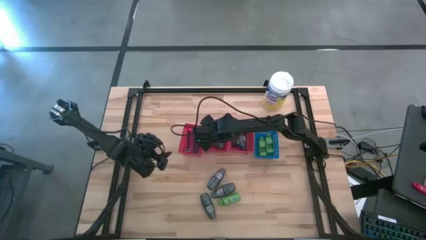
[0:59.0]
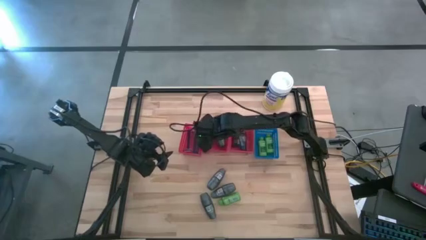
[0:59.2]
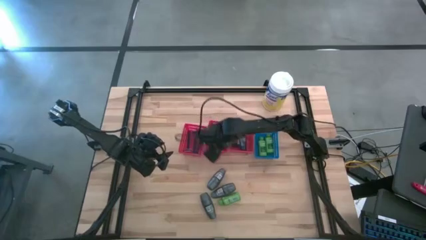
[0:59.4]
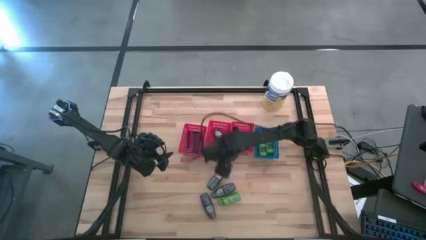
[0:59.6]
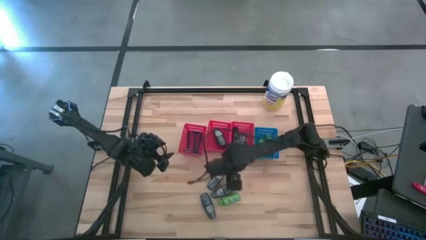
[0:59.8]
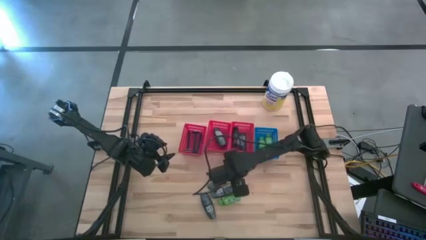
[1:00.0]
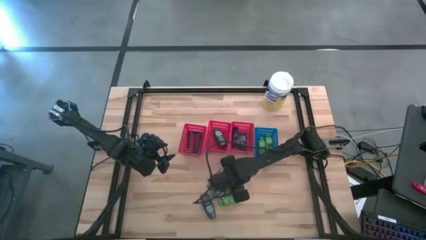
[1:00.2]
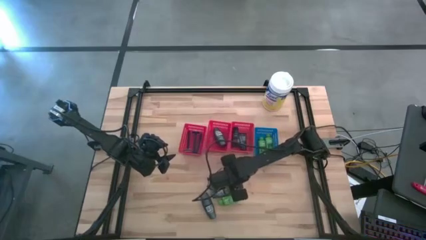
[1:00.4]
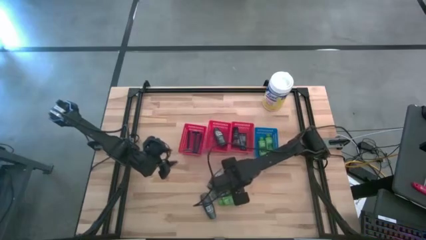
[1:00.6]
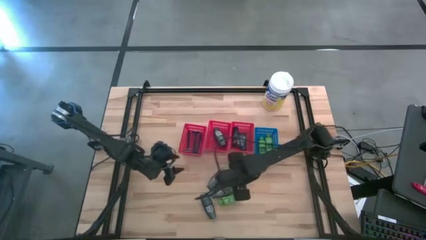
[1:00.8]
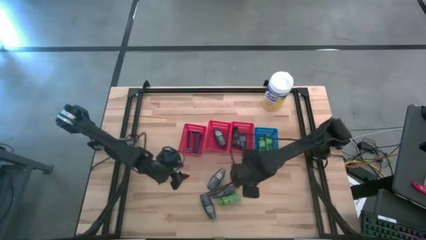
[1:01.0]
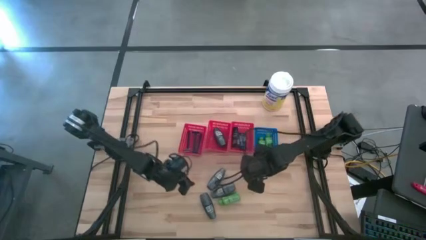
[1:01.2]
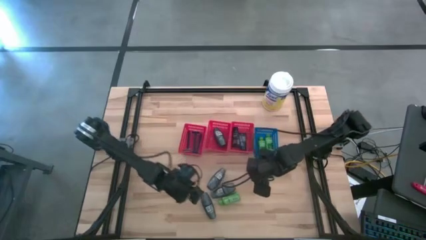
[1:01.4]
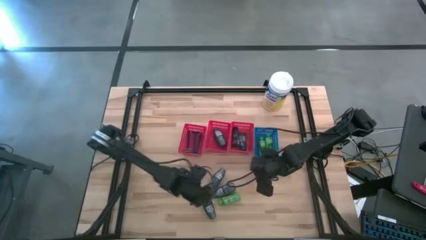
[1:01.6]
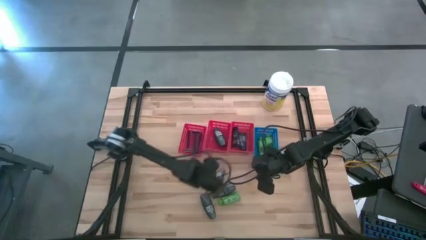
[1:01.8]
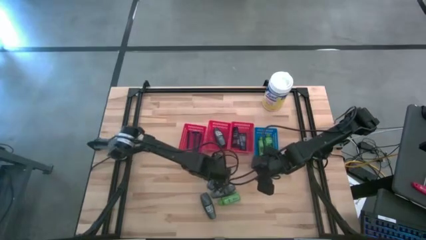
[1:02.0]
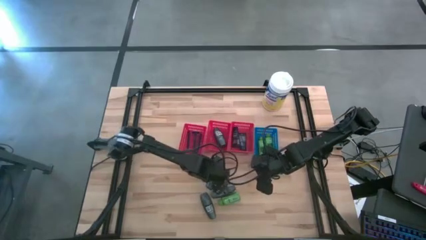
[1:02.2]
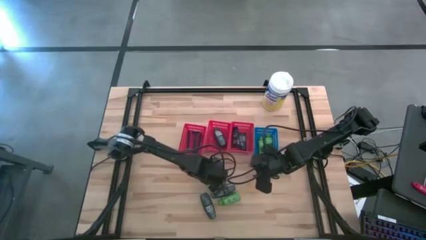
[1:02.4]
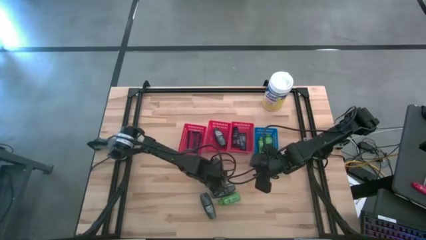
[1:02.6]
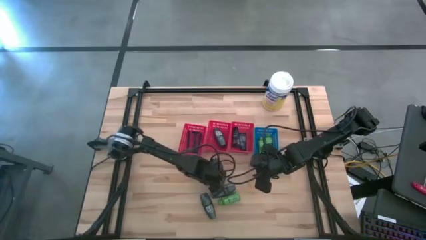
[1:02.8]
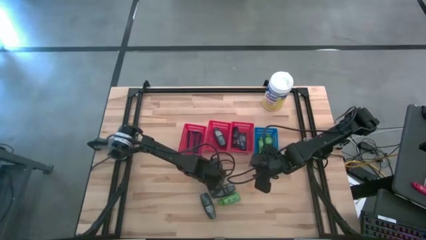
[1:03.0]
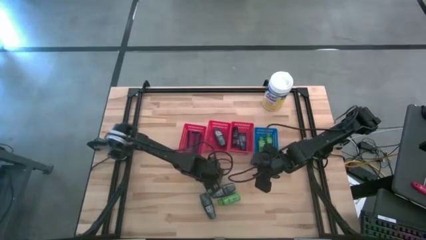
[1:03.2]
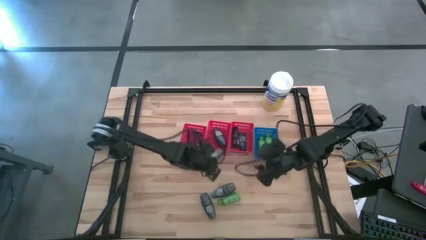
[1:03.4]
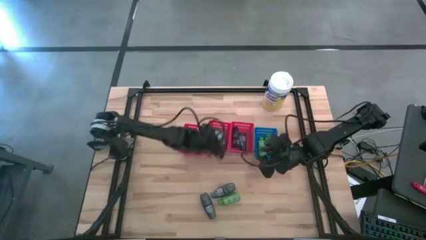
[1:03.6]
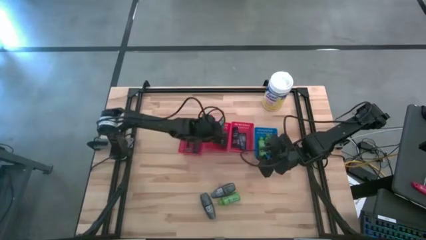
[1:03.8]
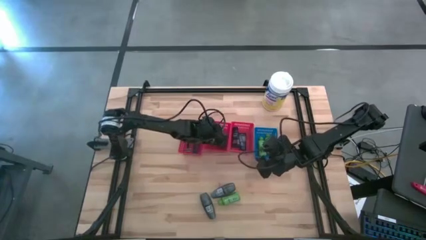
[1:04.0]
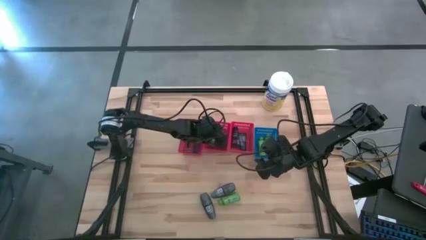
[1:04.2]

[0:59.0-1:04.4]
Task: Pick & Place Travel size toiletries
Put the deodorant into the middle red bin

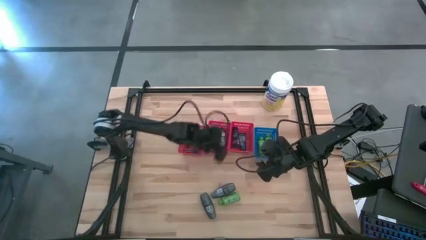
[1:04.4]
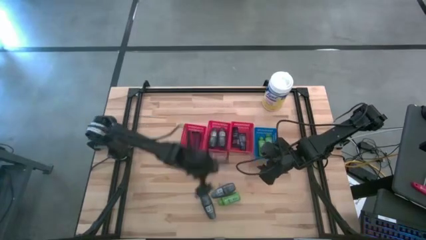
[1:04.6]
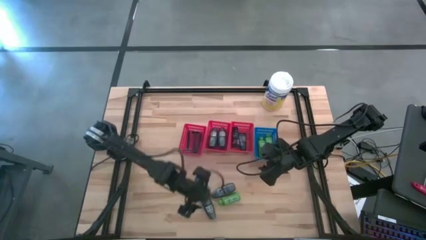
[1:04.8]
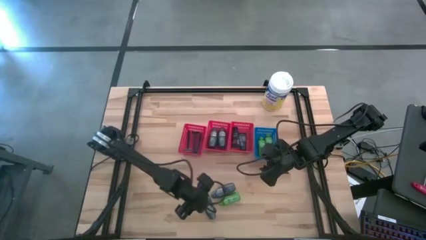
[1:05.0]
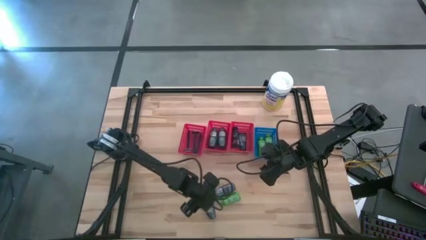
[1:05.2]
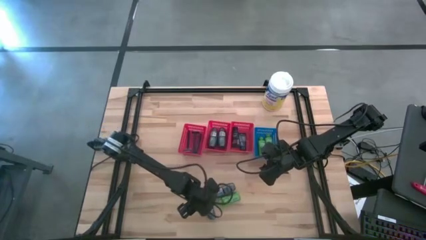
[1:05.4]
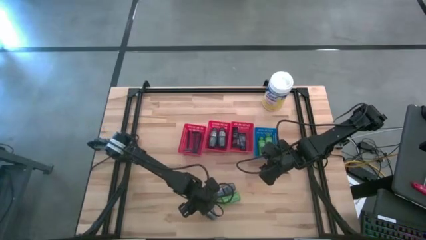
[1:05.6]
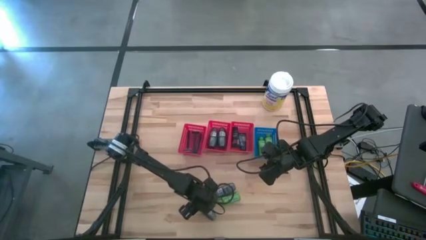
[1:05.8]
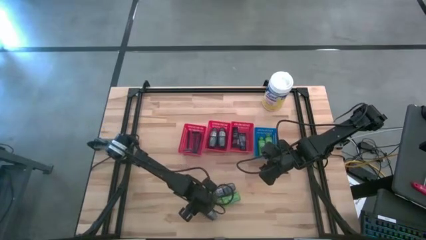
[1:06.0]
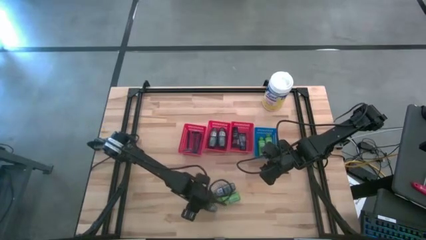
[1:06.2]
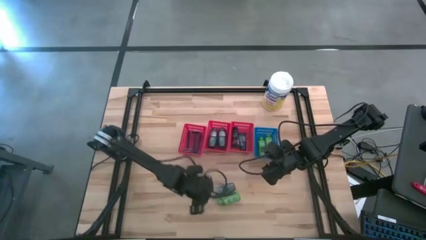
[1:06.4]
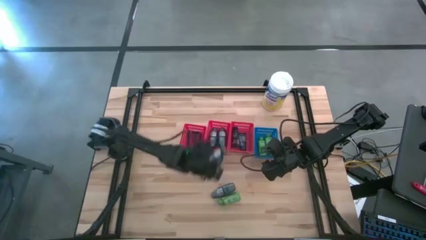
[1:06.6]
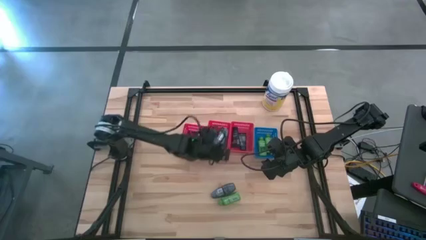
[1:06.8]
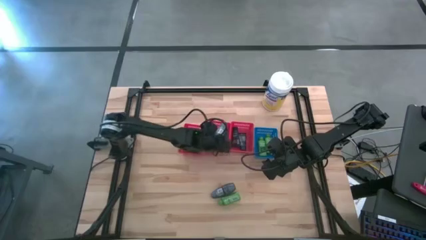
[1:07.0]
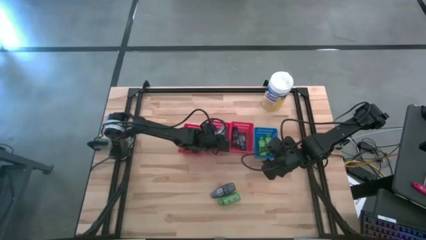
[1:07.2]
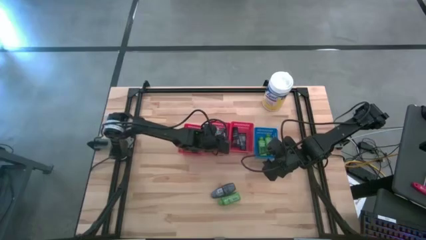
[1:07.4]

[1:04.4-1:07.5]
Put the deodorant into the middle red bin

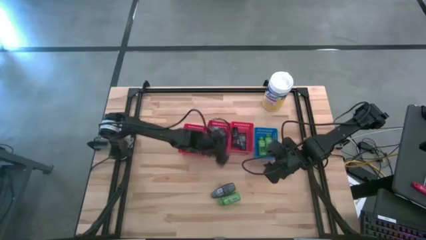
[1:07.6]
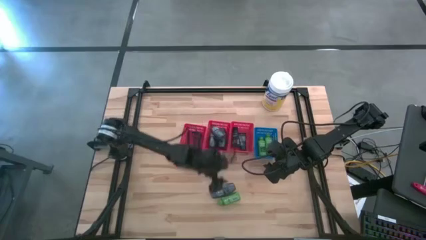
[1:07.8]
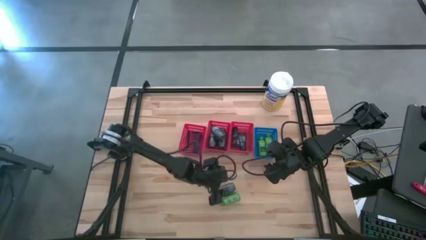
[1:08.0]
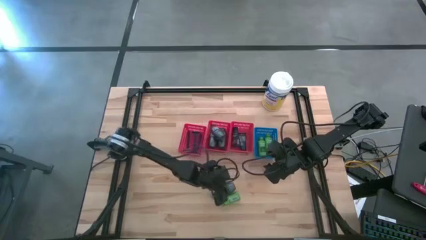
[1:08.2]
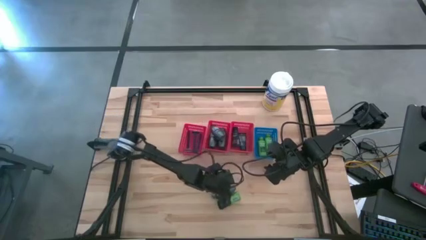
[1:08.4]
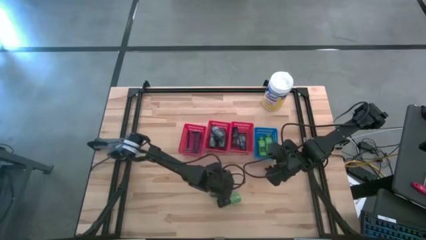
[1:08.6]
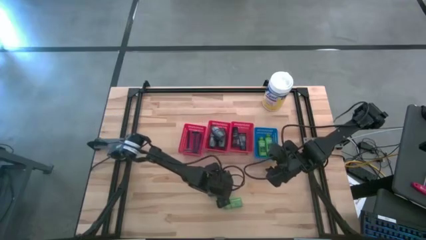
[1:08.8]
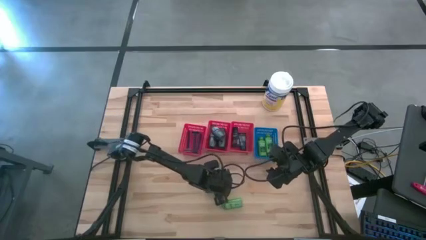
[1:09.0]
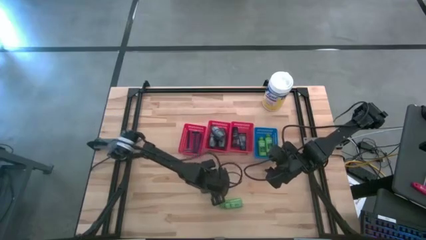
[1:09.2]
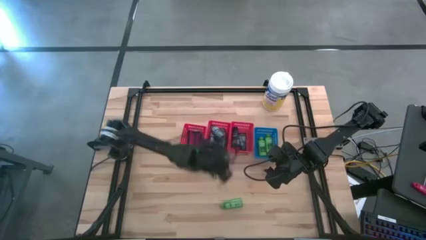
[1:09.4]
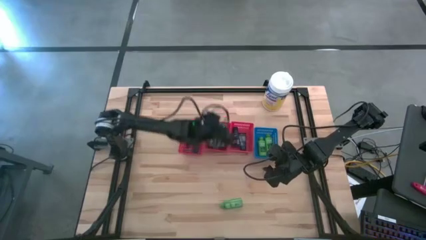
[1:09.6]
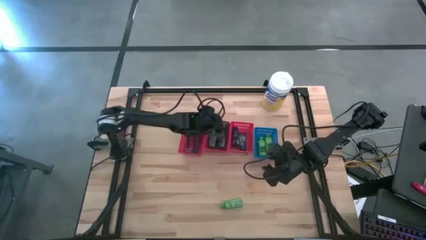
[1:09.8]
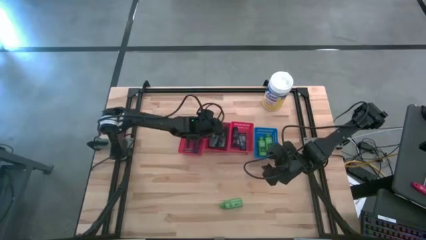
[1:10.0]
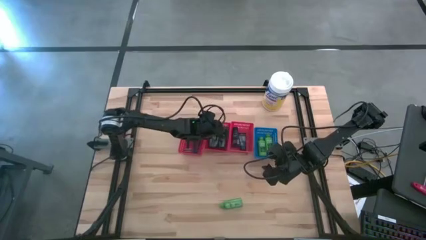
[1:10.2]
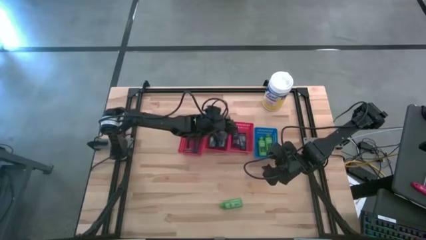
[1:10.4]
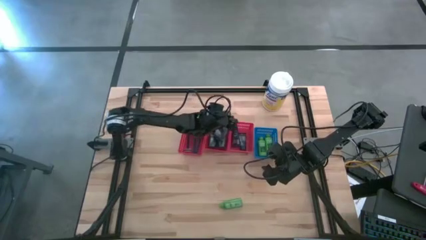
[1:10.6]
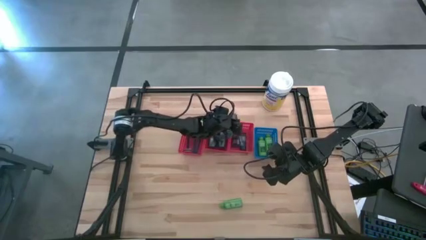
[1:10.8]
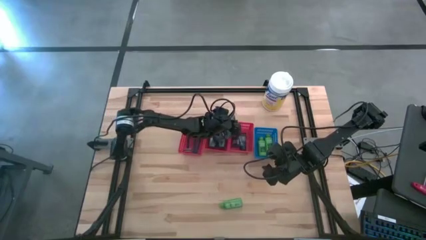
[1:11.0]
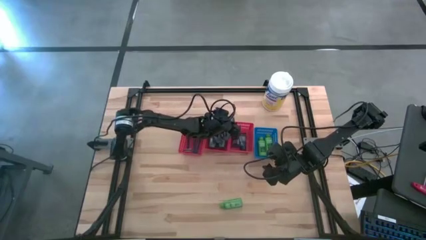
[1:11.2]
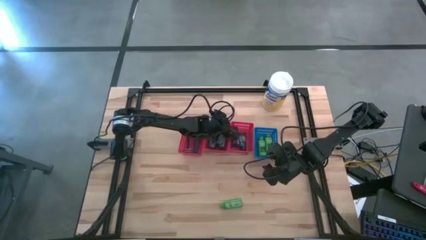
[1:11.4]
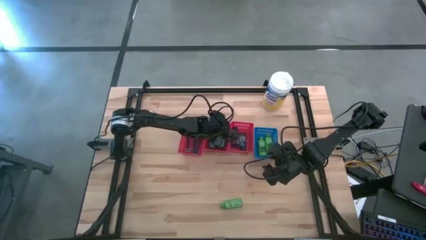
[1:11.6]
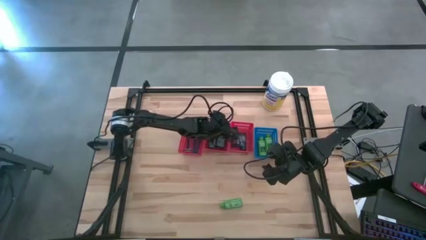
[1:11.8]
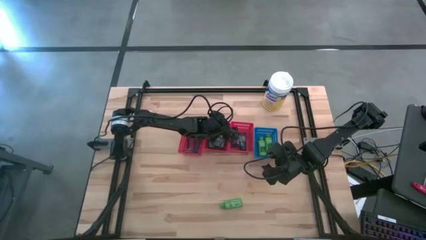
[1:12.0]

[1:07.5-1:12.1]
Put the deodorant into the middle red bin

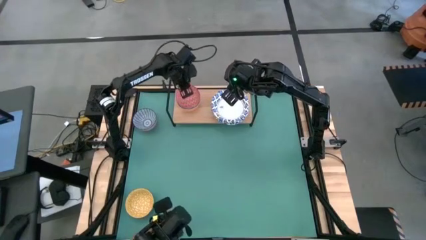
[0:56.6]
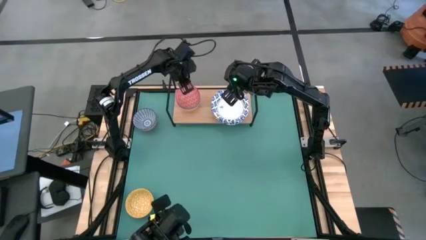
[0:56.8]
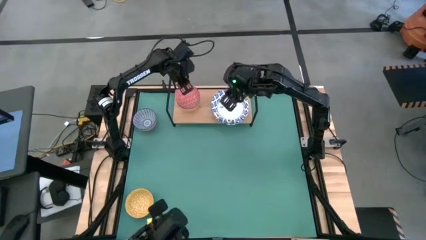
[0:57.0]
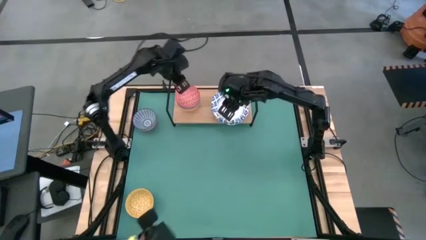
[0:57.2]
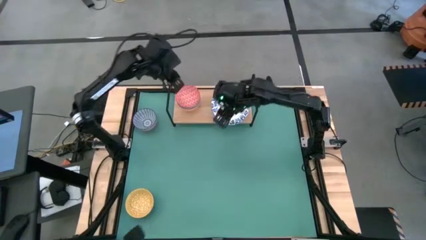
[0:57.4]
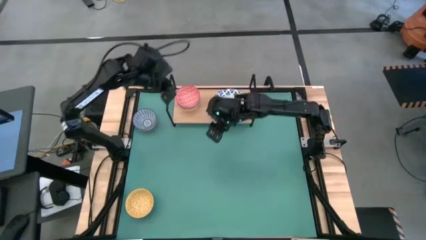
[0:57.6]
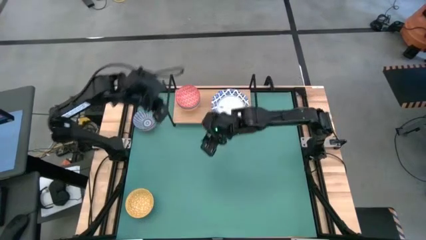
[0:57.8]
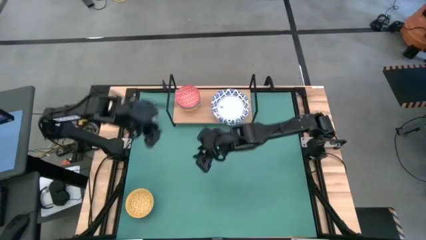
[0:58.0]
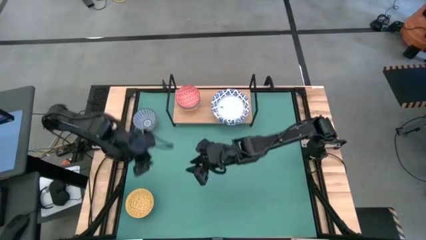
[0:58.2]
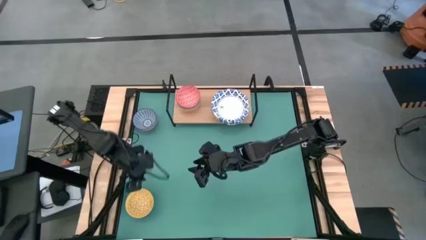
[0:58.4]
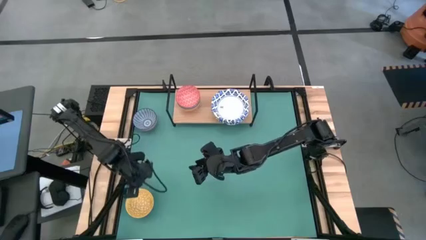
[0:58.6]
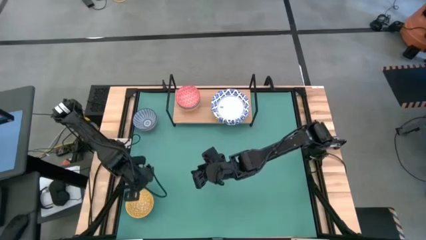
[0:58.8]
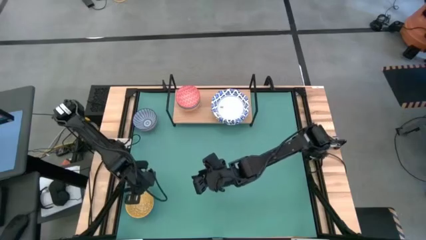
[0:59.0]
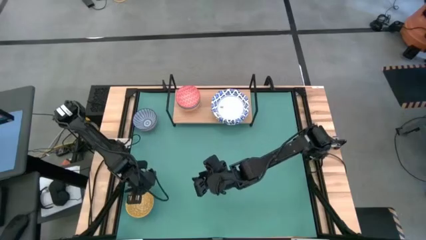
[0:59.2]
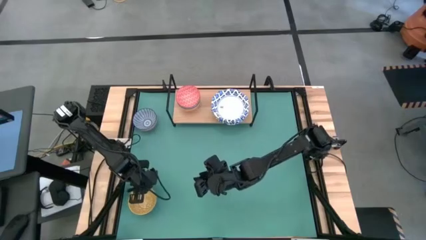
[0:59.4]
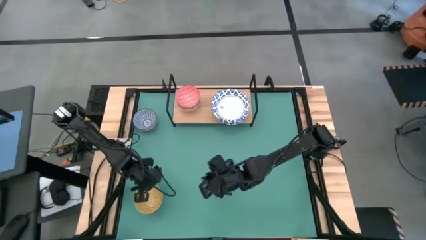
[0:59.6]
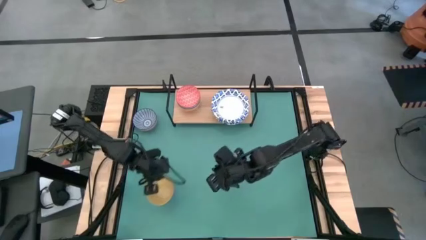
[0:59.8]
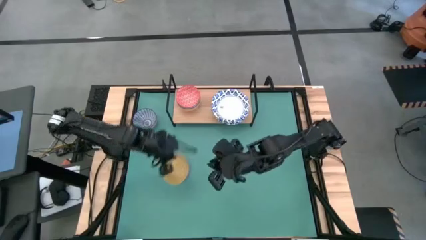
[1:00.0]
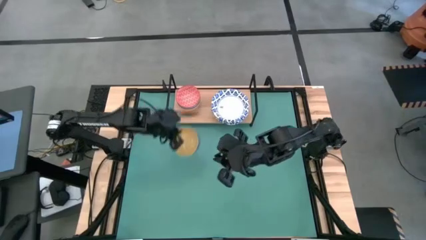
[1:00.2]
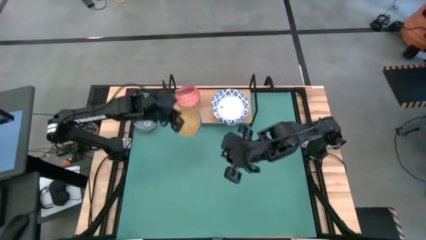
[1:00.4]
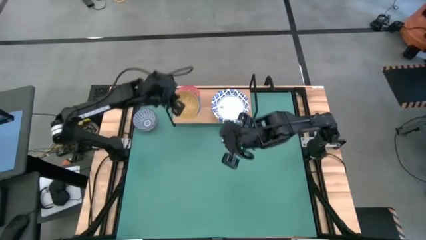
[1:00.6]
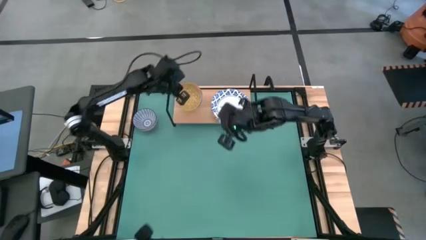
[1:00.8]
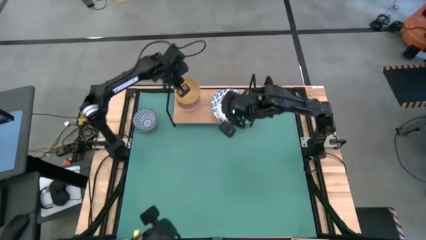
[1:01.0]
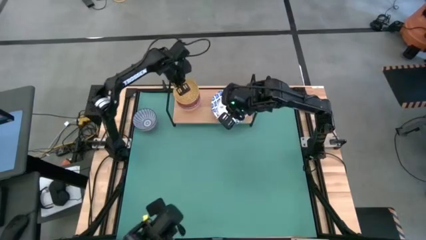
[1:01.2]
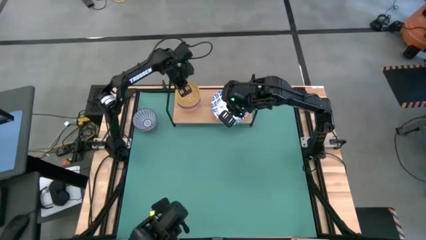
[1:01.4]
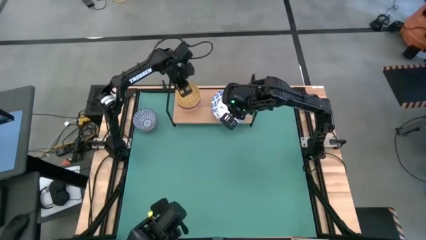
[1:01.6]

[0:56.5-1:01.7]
Task: Place and stack bowls onto a shelf
Stack the yellow bowl on top of the red bowl on the shelf
